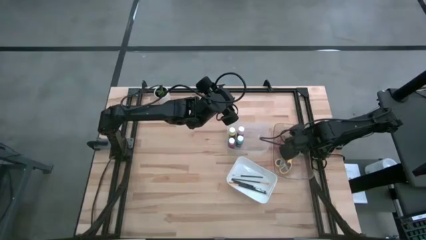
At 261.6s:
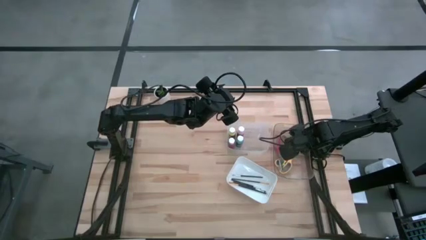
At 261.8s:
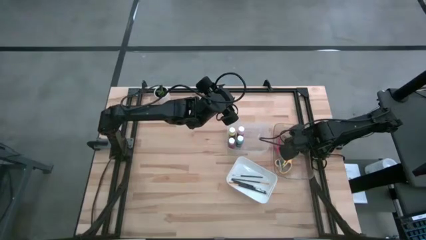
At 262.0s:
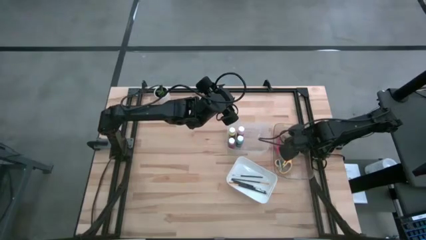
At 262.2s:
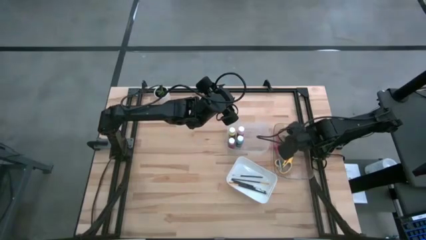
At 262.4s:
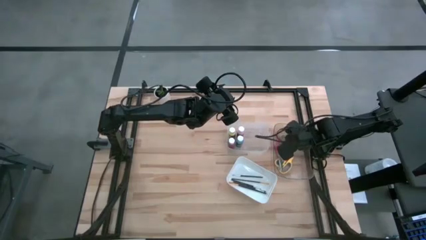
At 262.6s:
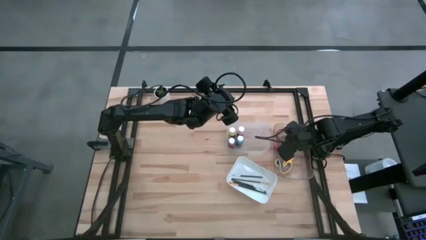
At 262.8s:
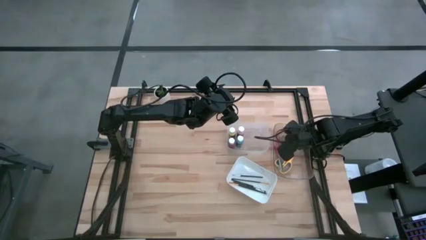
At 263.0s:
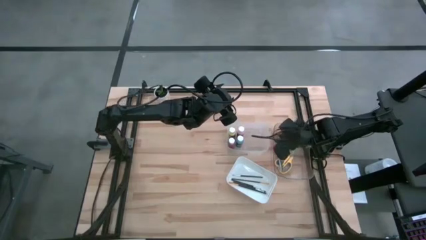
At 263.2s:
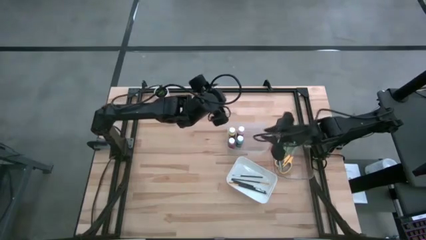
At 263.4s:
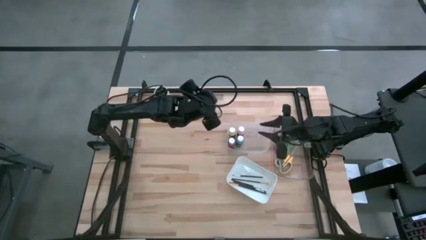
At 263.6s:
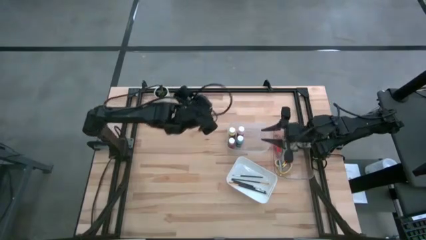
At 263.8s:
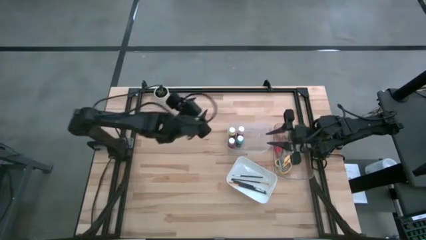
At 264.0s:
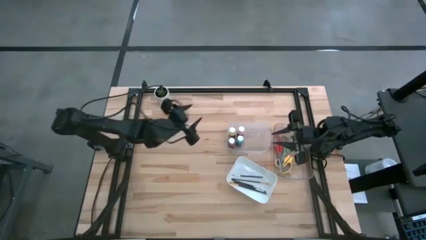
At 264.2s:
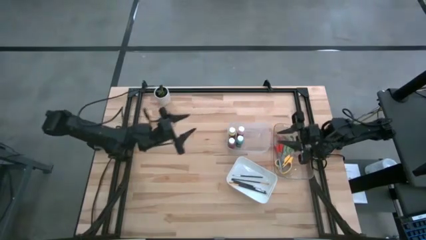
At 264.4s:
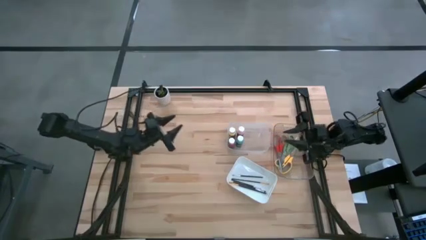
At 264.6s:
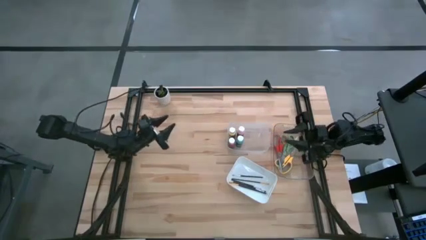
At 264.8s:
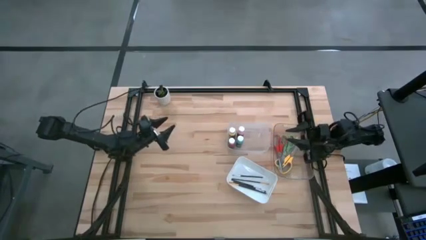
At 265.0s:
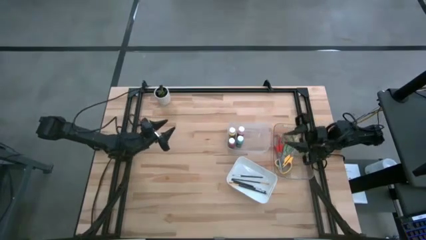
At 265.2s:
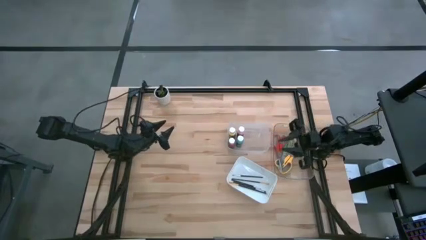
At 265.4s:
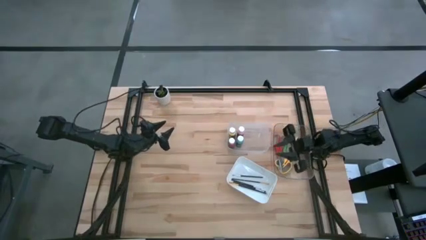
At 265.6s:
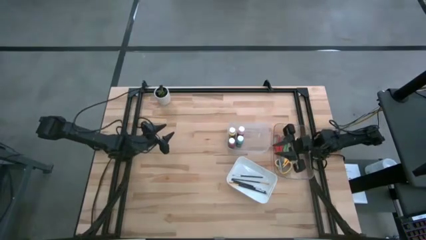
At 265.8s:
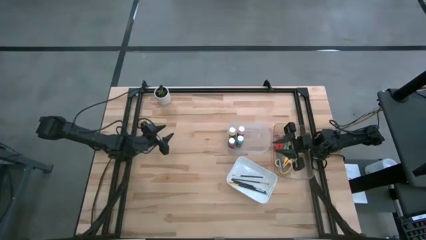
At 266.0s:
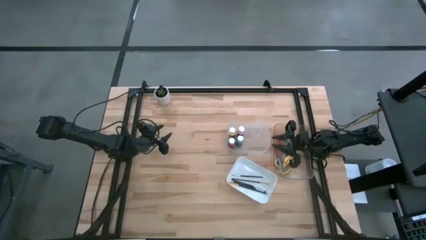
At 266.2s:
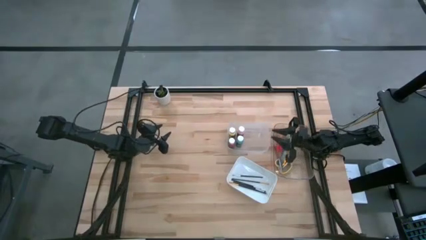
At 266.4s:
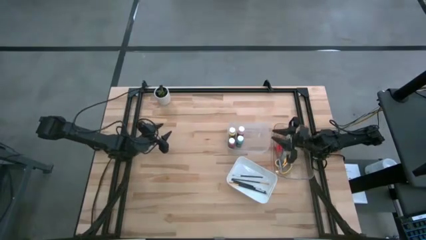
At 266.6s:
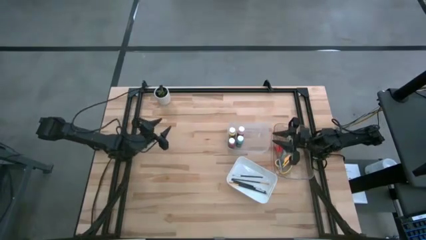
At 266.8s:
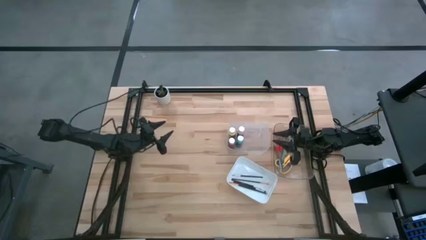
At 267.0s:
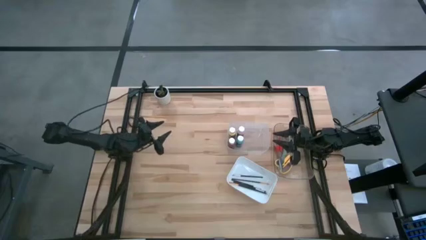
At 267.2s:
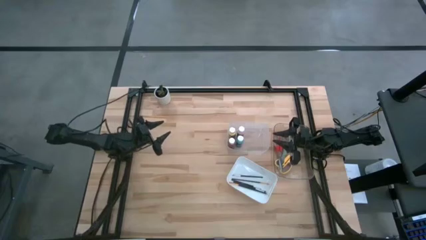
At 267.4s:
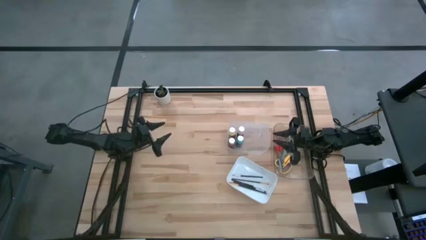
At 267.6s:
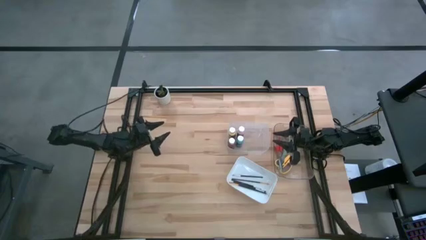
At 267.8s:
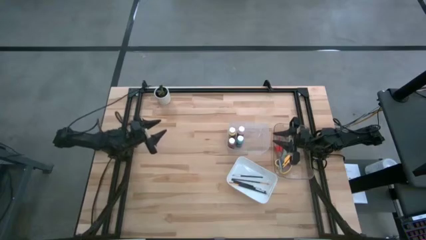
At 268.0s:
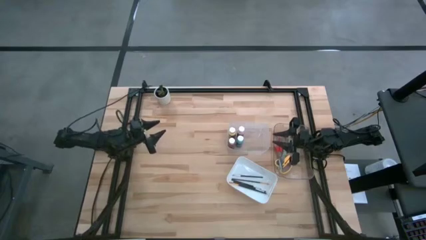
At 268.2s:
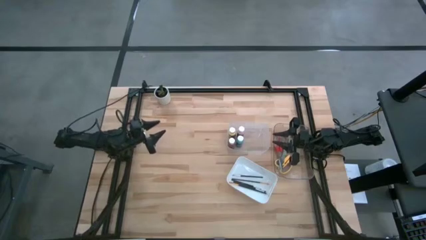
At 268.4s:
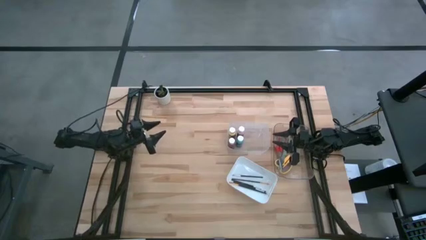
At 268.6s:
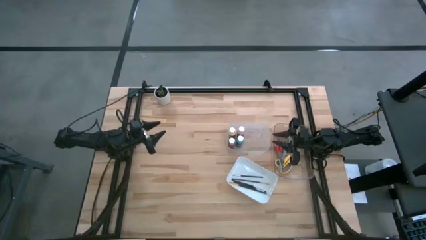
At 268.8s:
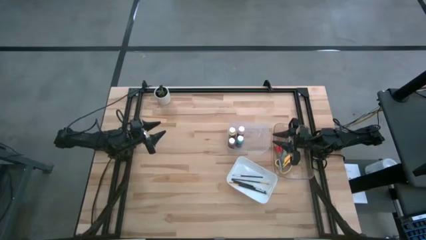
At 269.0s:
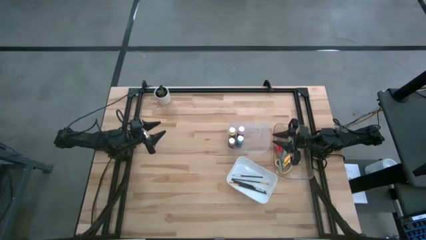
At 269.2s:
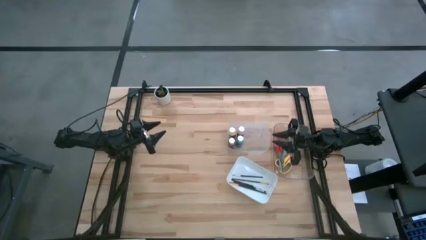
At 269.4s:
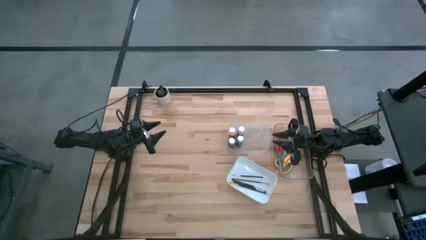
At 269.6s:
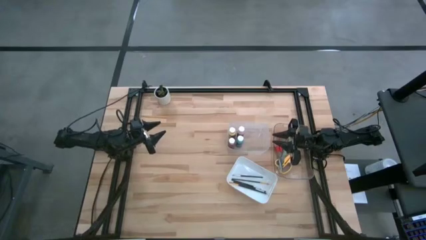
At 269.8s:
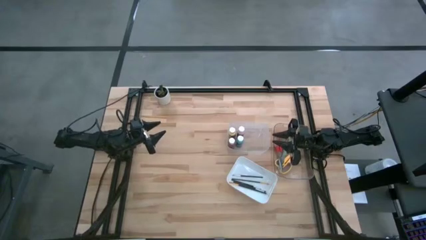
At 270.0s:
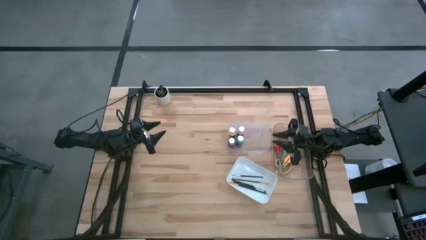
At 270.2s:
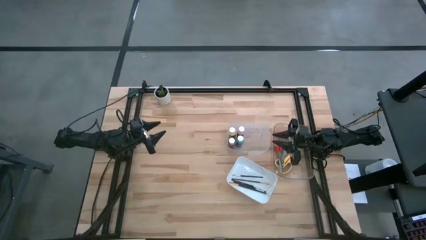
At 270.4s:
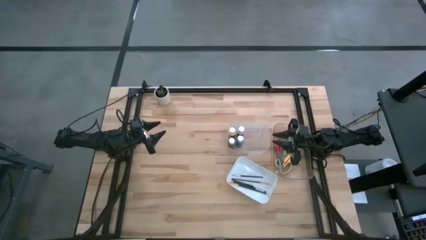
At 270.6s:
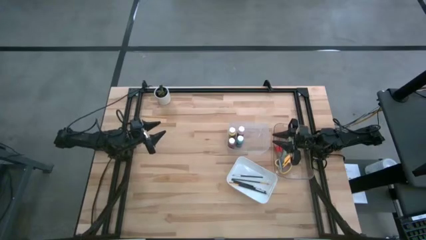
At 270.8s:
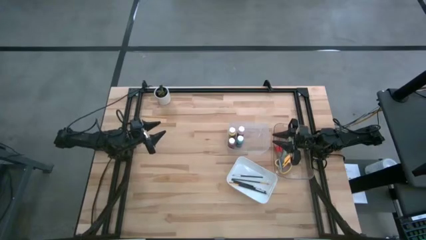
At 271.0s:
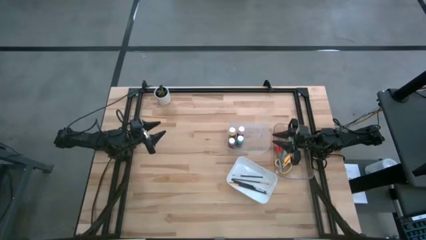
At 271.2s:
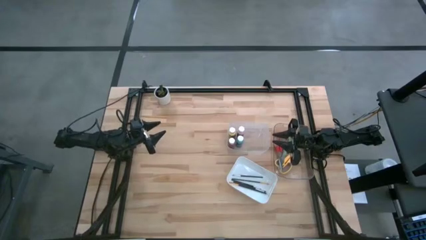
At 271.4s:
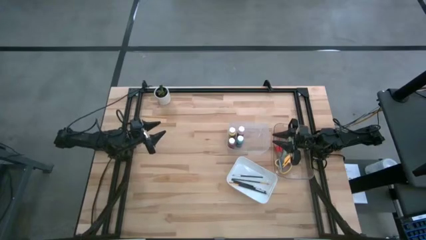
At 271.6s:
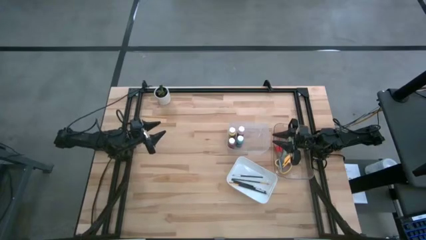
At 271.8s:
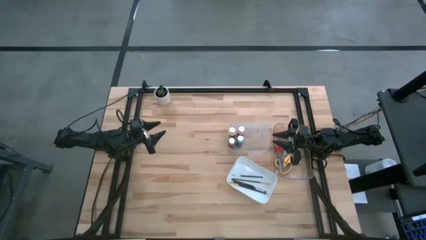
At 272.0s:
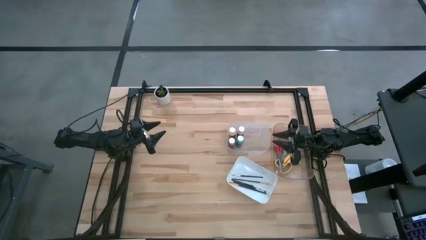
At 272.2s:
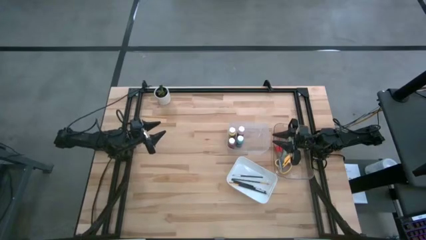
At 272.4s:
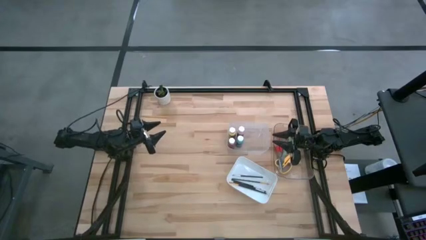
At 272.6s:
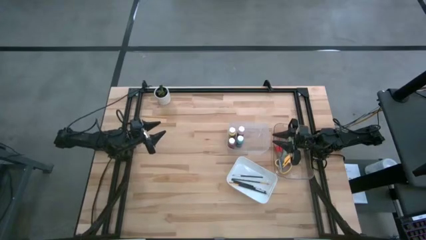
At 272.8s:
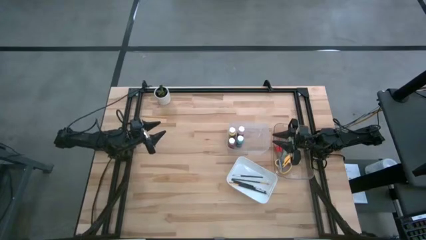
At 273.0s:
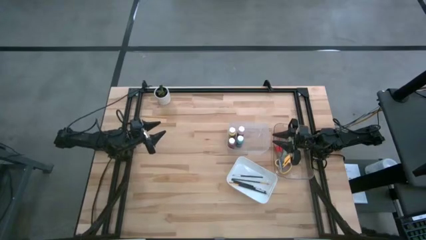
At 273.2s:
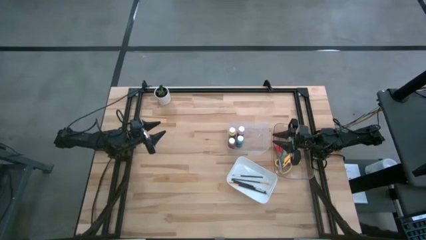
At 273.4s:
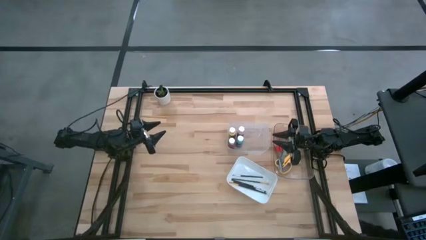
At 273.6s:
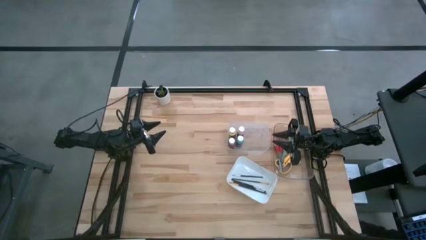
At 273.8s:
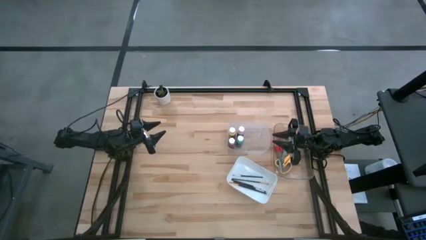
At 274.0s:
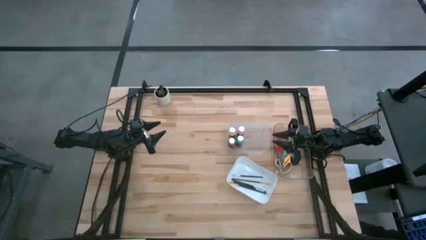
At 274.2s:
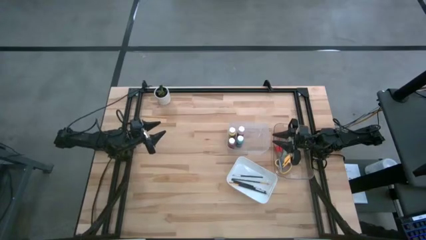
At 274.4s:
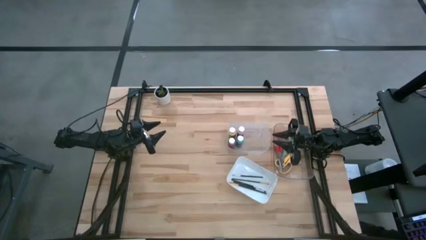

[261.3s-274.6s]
Task: Pick & Place Paint Supplies
Return to Home Position

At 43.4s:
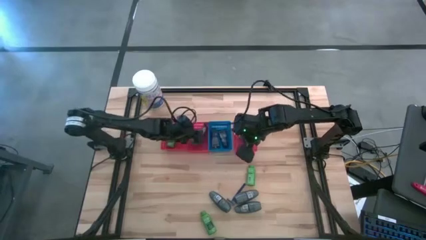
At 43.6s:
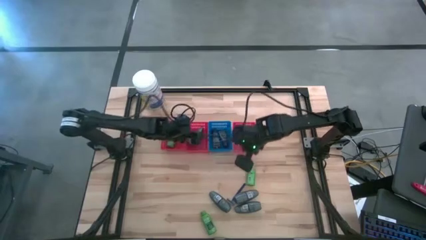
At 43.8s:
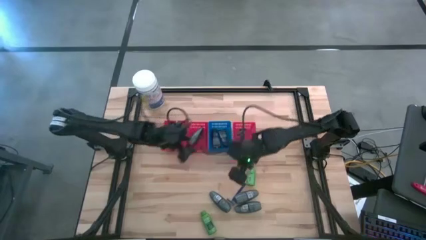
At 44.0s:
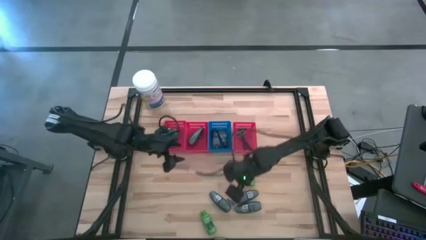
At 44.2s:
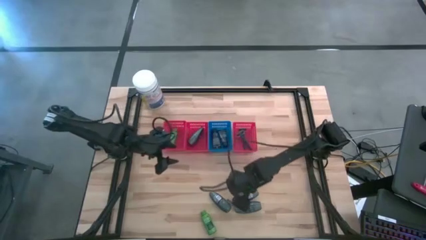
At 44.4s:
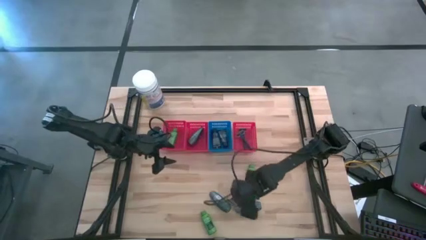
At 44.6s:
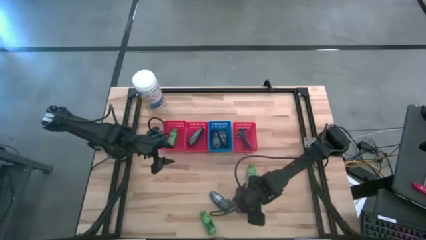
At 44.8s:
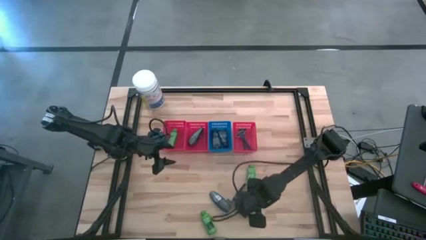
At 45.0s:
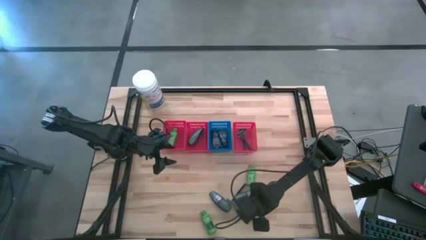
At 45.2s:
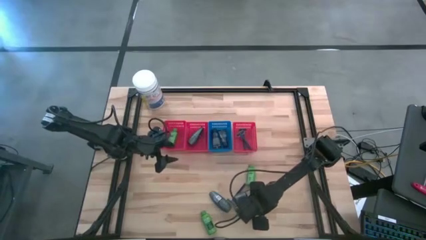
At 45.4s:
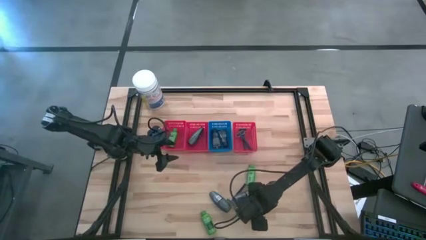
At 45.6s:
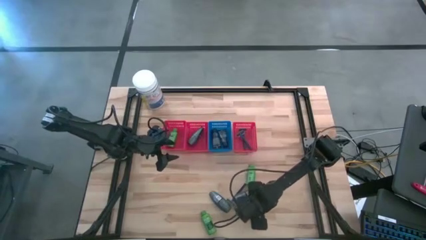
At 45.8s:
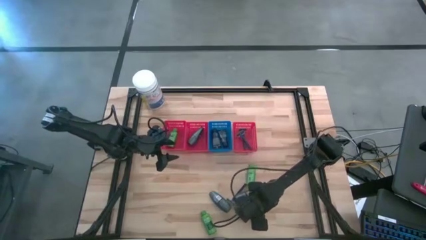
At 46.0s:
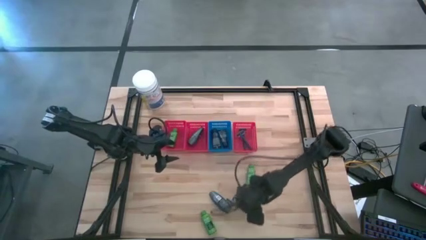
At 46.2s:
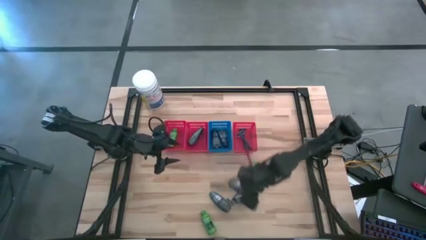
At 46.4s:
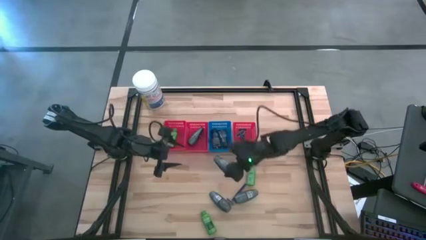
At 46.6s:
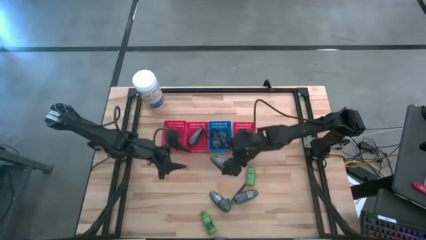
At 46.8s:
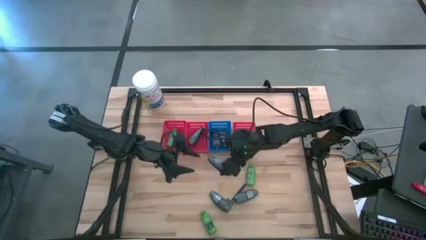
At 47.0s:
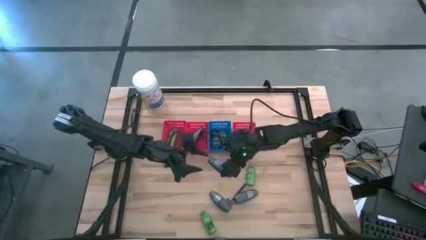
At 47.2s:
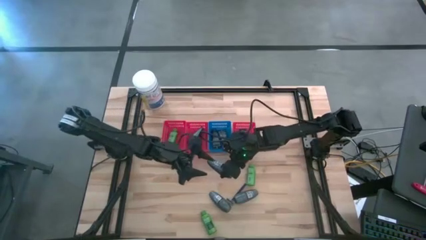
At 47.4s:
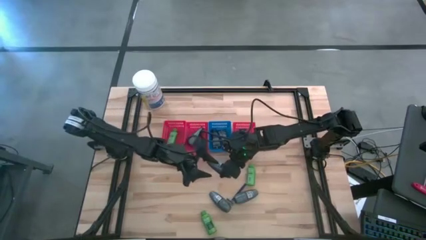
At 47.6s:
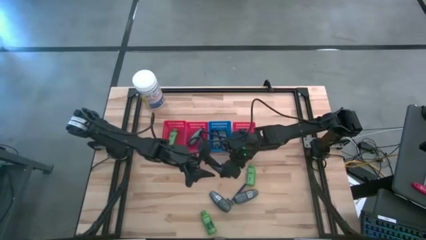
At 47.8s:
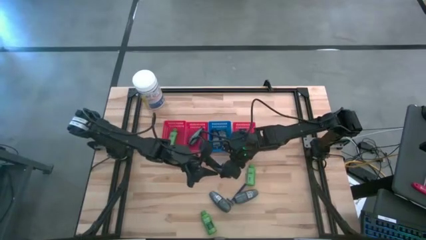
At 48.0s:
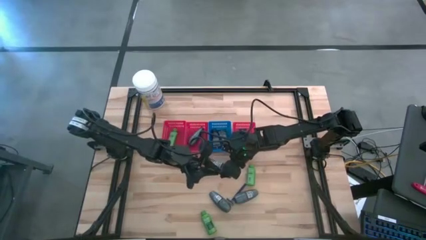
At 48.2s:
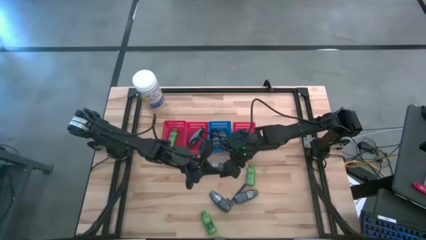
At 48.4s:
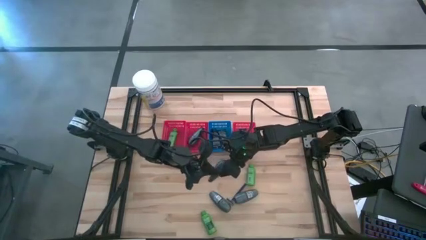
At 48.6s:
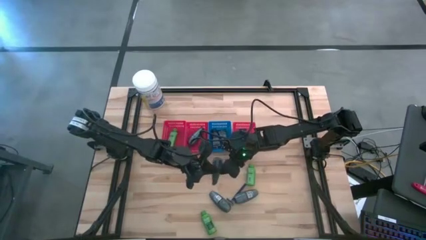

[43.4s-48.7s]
Task: Pick & Place Travel size toiletries
Put the gray deodorant into the middle red bin
